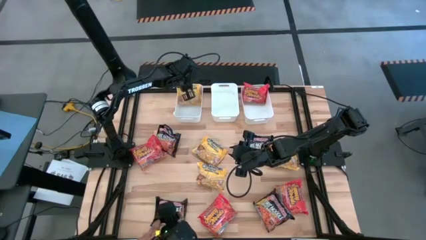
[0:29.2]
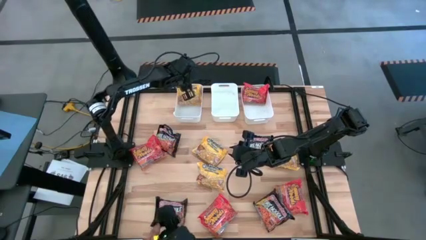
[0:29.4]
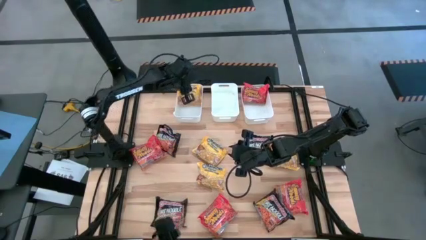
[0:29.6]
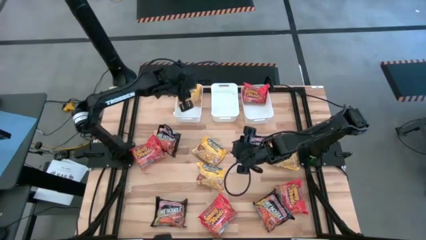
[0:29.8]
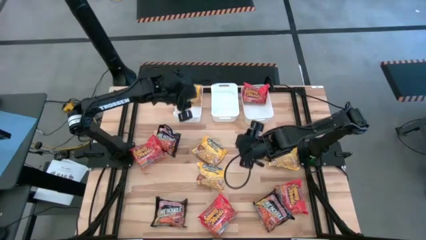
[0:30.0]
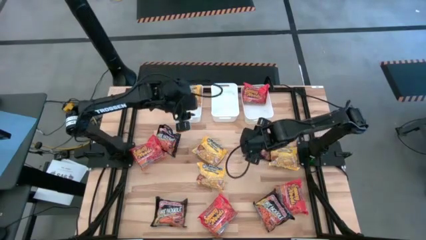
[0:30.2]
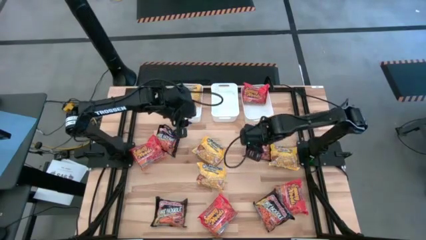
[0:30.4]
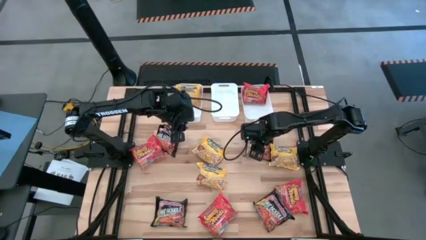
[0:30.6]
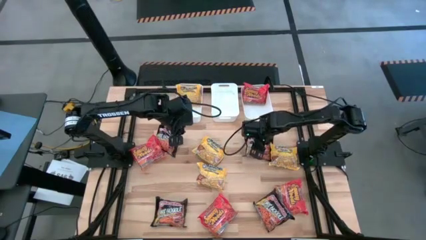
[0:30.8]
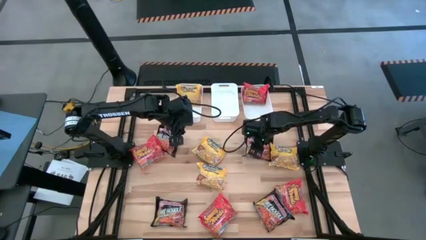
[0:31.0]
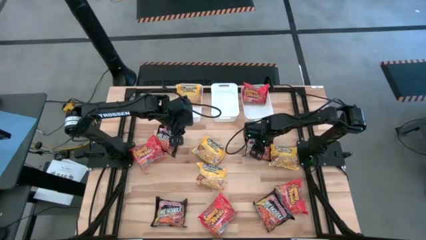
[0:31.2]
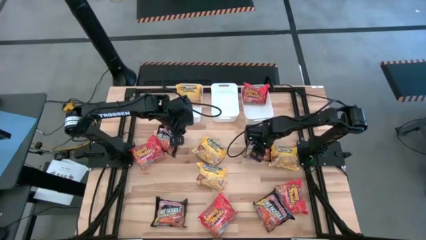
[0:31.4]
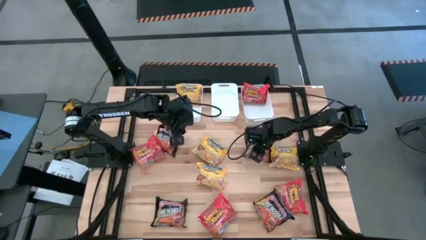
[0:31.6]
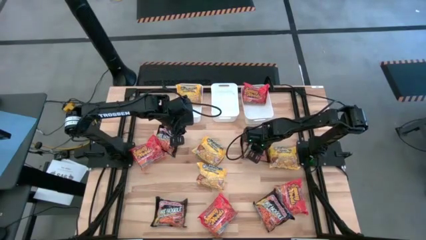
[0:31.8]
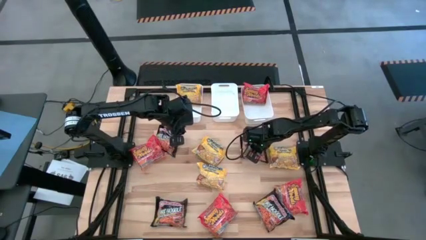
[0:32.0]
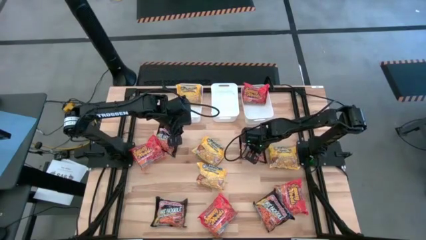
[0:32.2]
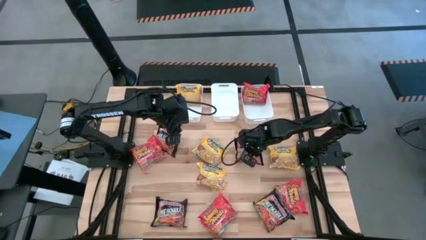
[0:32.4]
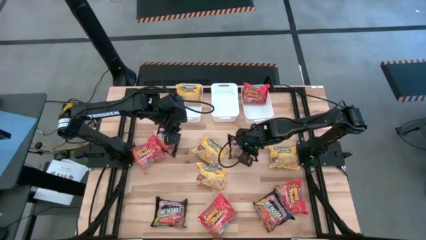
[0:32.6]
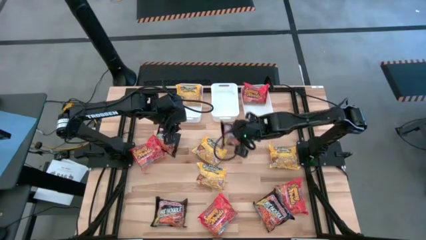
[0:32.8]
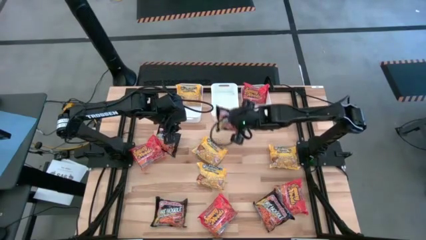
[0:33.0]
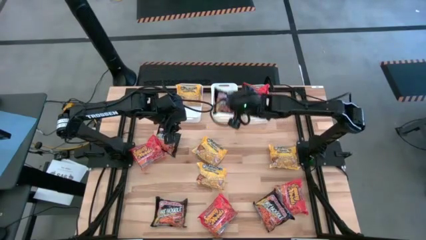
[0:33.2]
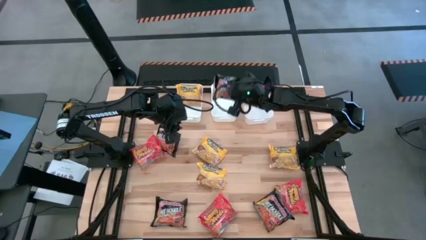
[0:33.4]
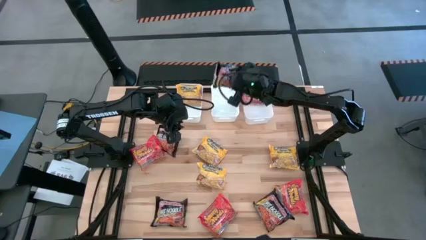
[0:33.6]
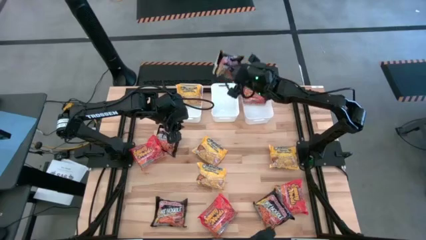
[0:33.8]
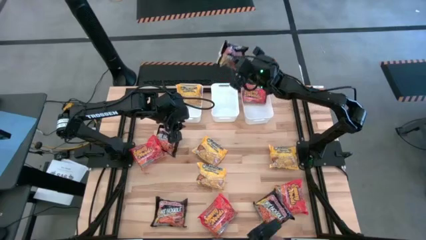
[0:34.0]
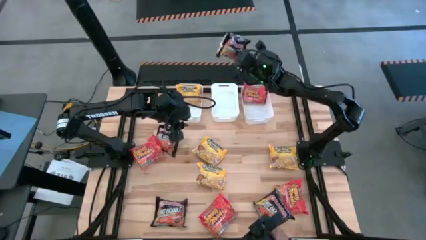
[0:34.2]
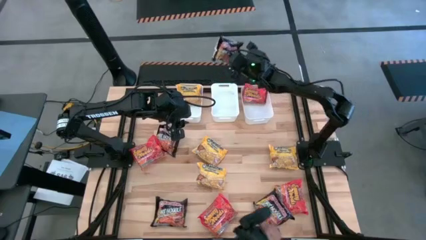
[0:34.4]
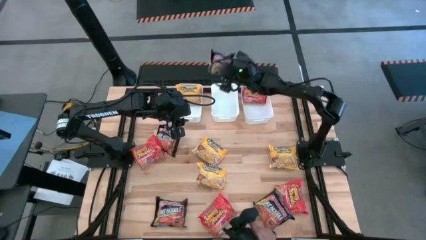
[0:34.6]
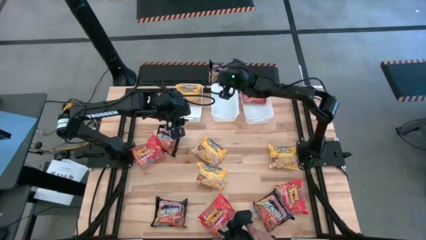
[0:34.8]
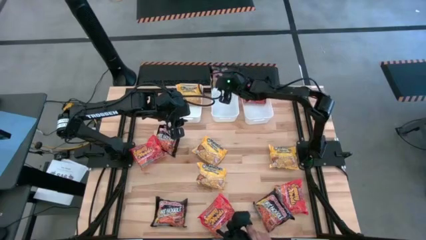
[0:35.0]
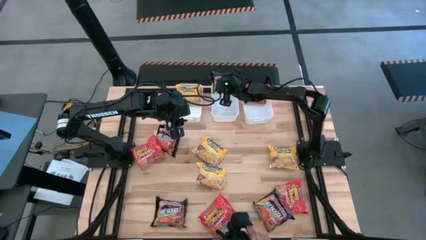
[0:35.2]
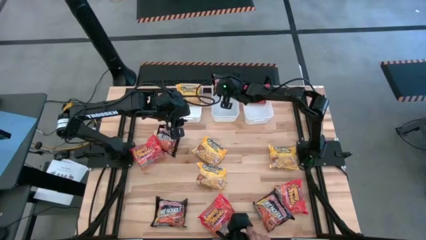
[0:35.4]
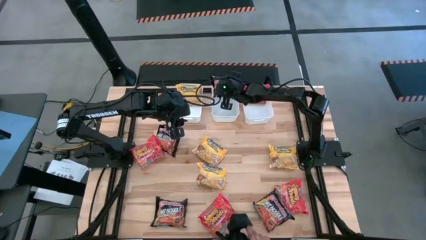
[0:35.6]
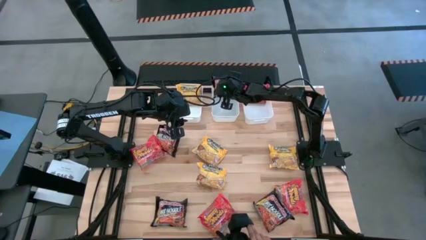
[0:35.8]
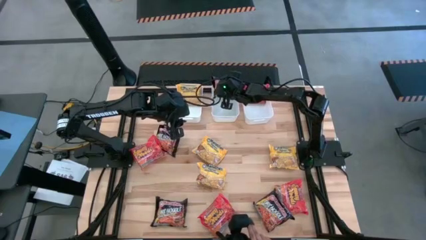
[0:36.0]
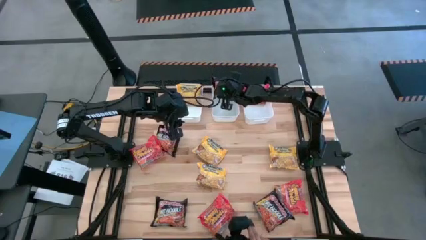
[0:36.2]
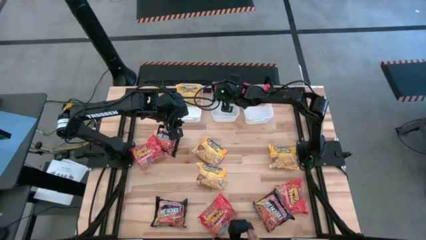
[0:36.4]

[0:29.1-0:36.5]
Task: Sort Maruchan noodles
Put the black noodle pack into the middle white bin

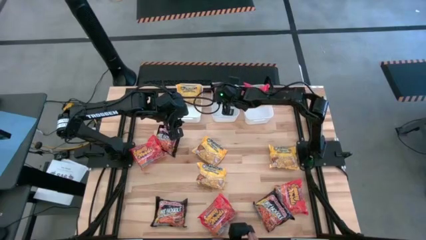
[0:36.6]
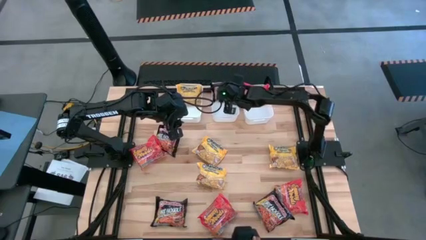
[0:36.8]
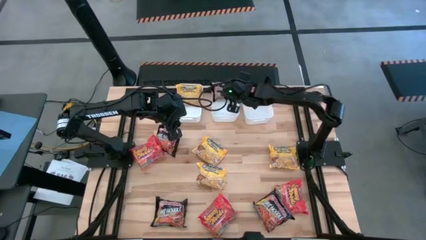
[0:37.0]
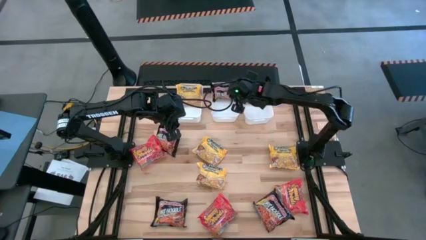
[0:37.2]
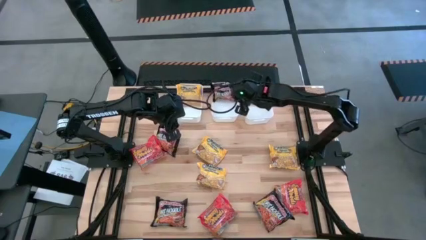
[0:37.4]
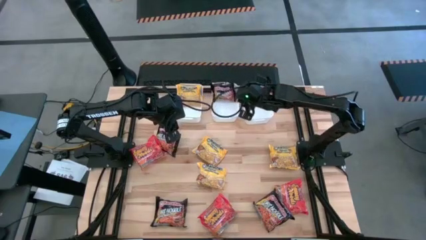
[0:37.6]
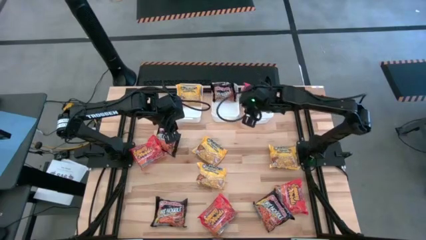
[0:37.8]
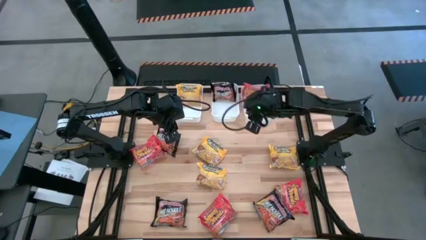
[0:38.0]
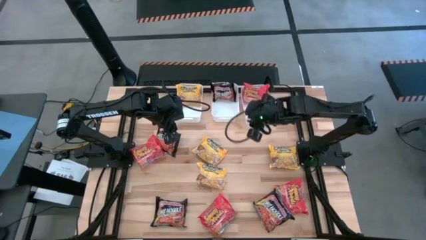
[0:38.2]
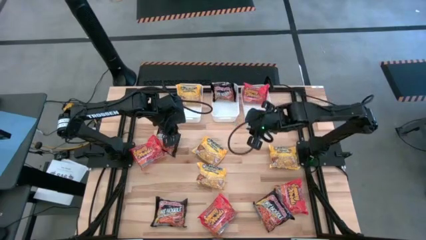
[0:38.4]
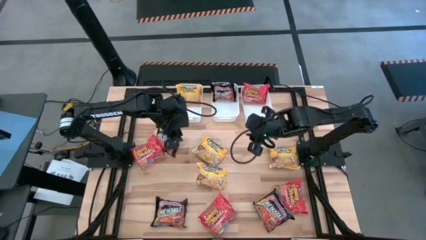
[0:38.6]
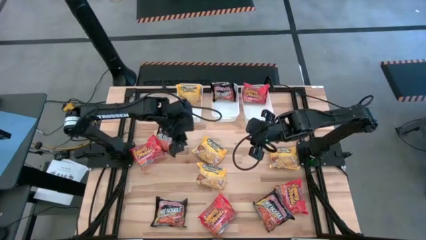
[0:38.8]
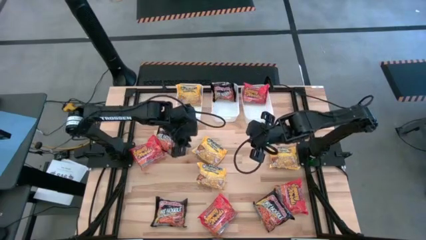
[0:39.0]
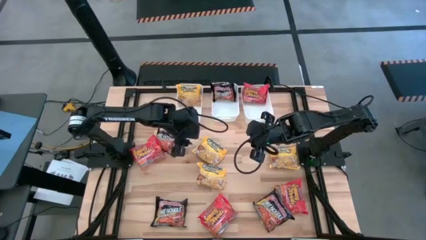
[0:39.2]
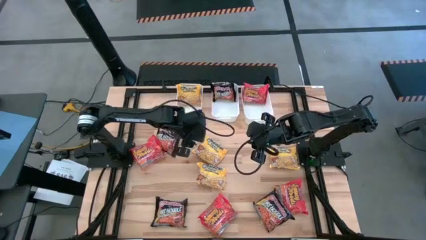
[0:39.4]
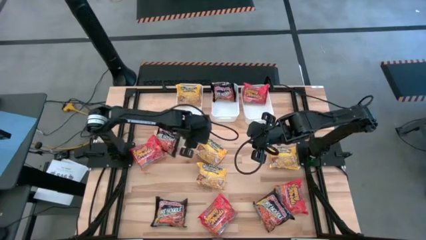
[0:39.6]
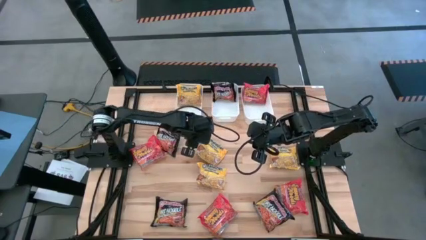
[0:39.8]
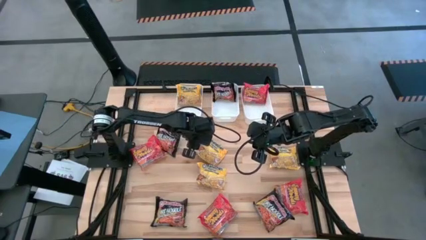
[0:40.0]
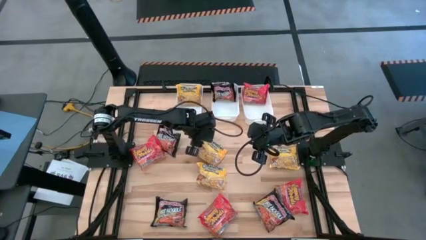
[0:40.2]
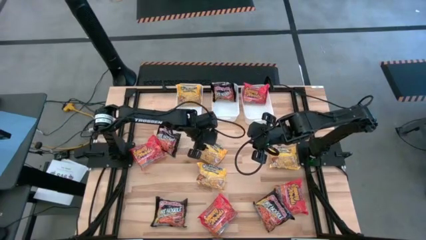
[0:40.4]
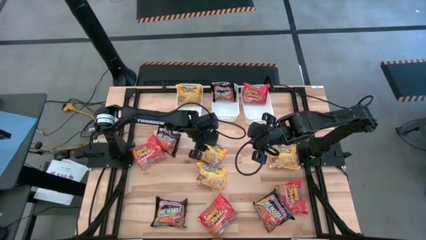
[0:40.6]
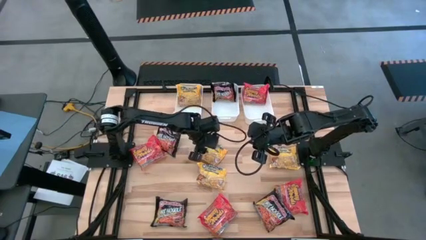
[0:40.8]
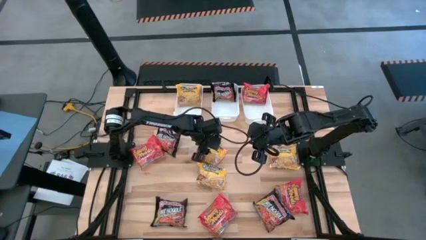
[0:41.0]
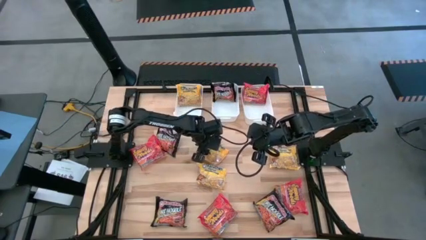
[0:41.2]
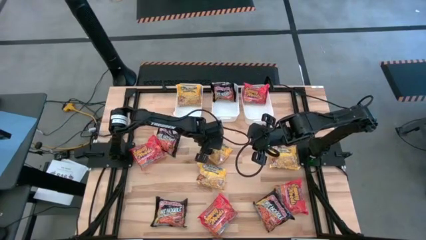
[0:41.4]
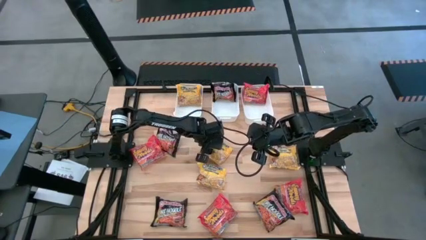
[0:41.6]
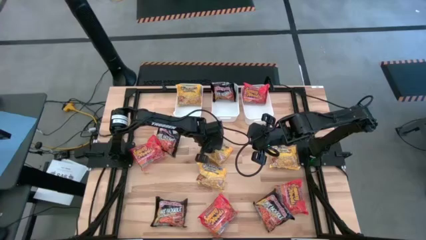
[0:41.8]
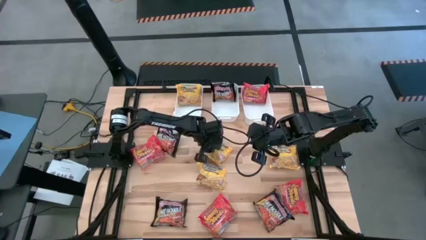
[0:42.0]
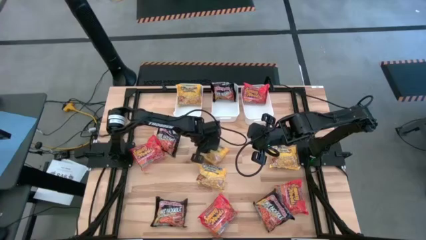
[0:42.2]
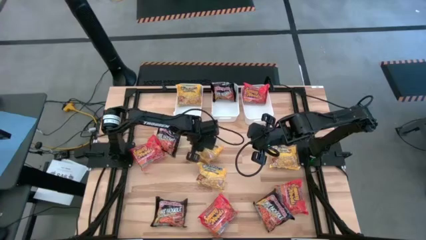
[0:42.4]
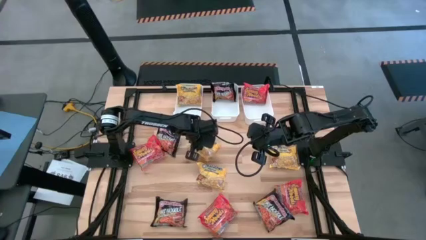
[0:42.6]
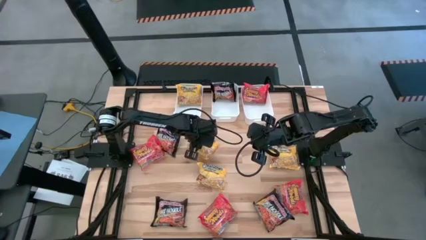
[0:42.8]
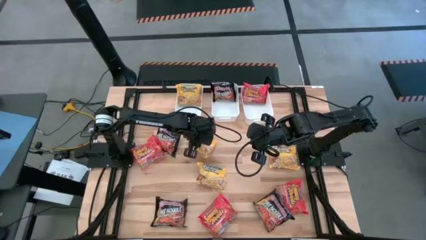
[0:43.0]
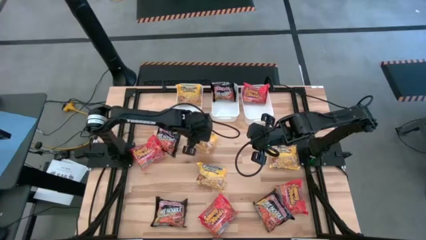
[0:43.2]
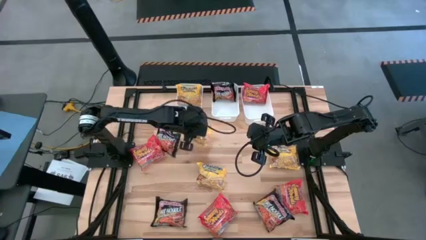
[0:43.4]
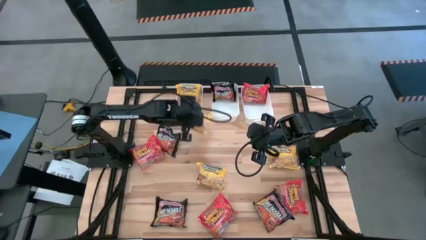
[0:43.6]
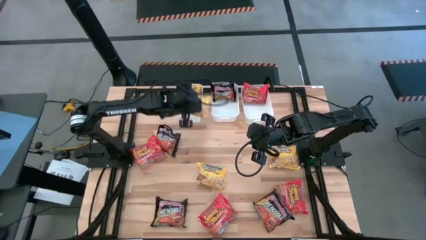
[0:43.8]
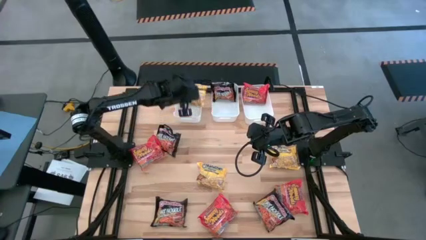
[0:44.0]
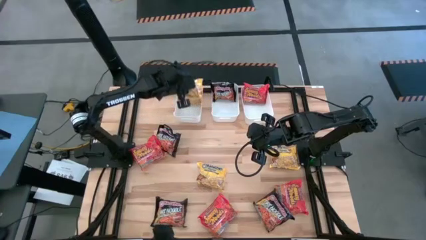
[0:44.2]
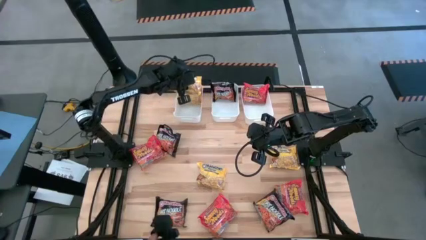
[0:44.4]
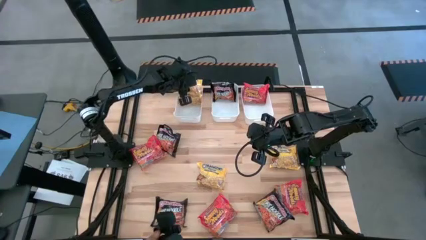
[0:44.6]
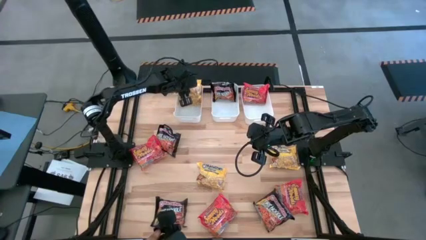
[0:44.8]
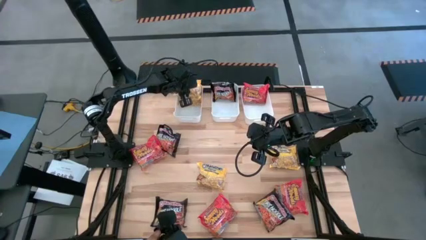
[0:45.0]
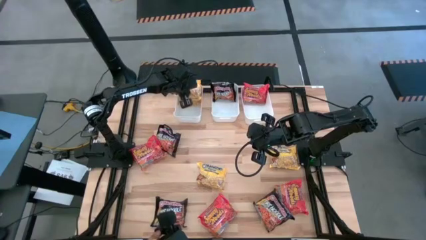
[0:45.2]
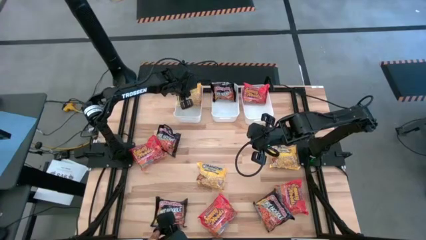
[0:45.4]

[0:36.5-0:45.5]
Put the yellow noodle pack into the left white bin

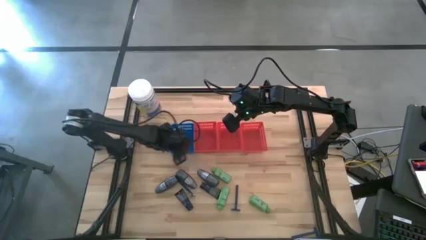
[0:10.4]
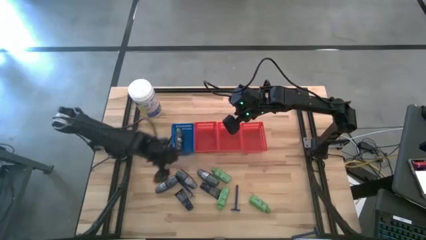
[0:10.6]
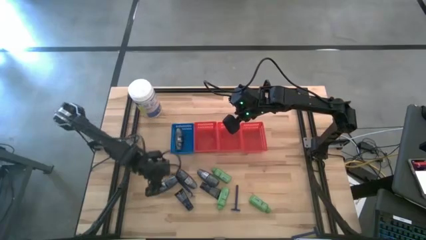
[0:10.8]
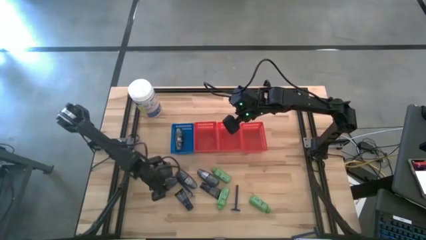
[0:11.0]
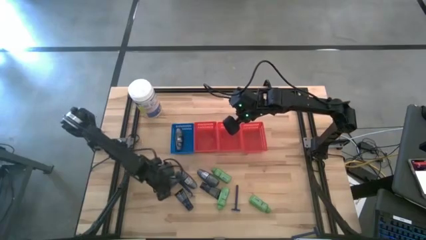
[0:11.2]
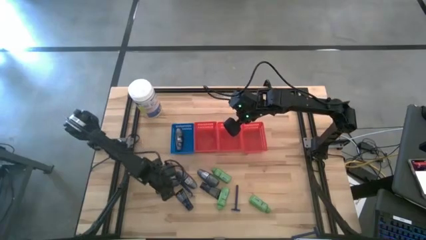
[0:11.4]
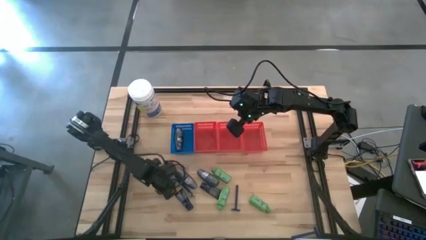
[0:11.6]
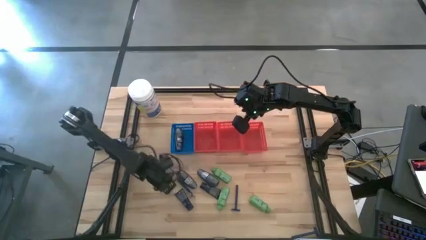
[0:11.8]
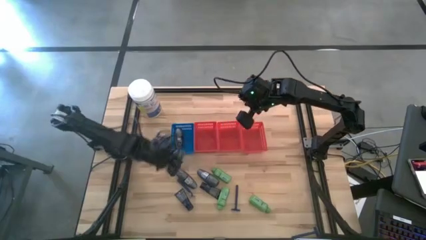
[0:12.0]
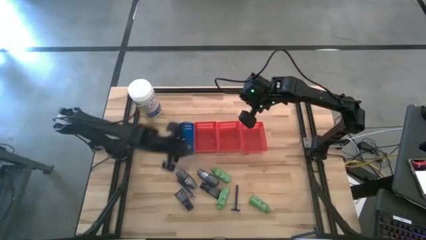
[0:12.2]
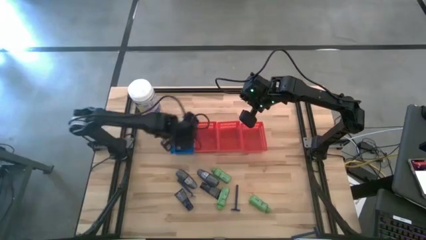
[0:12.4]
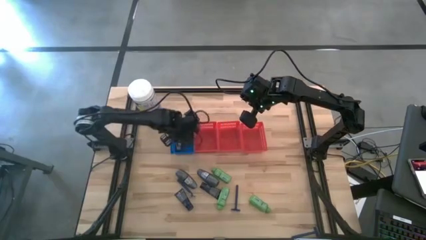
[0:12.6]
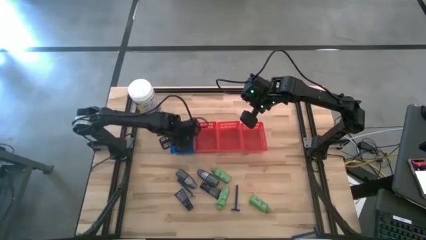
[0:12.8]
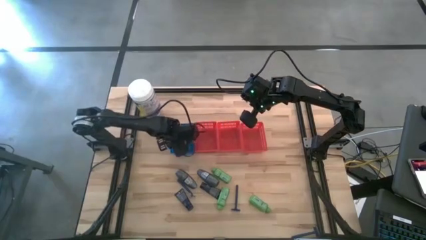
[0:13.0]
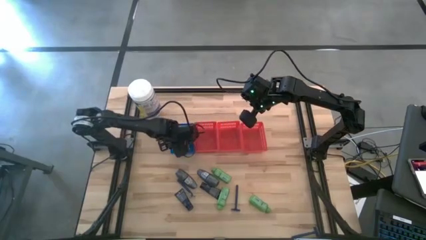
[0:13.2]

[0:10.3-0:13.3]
Task: Pick & Place Travel size toiletries
Put the deodorant into the blue bin
